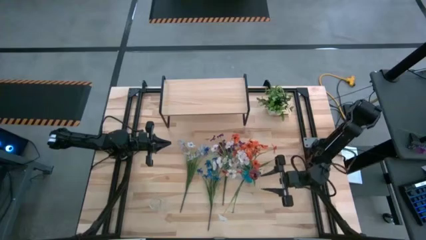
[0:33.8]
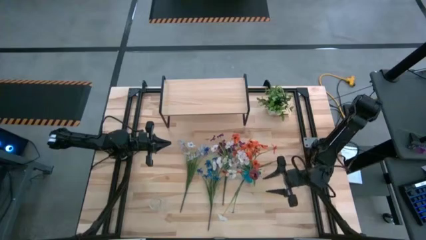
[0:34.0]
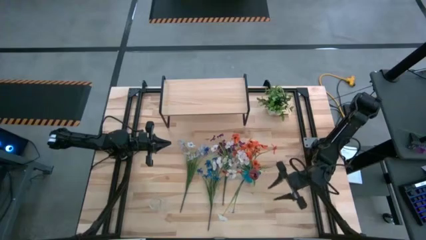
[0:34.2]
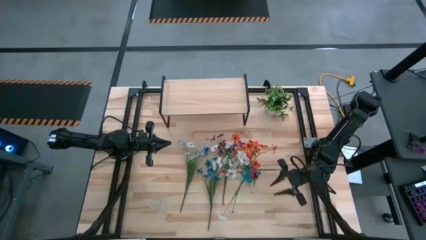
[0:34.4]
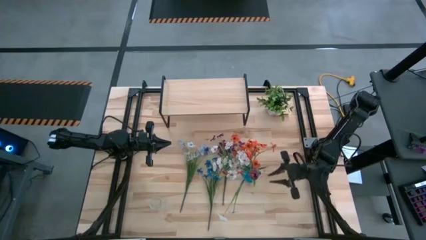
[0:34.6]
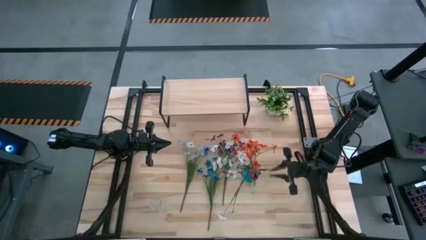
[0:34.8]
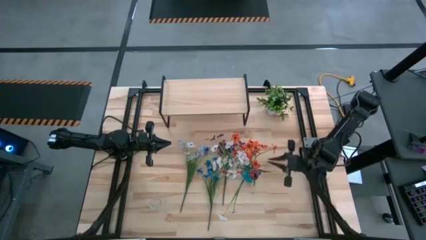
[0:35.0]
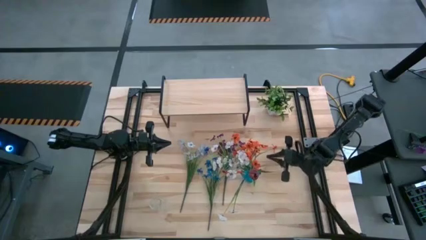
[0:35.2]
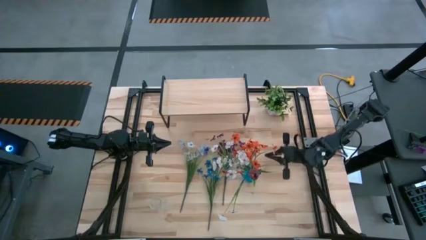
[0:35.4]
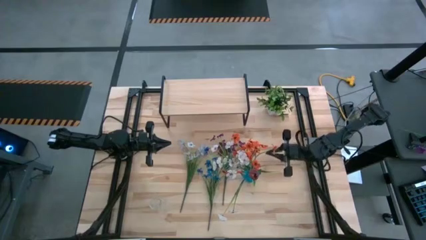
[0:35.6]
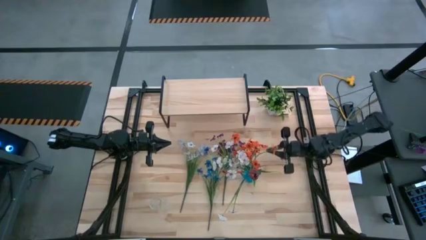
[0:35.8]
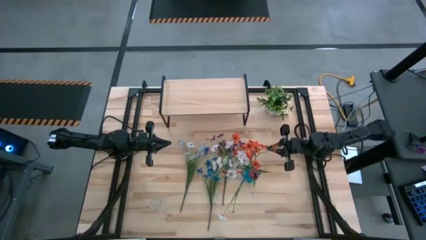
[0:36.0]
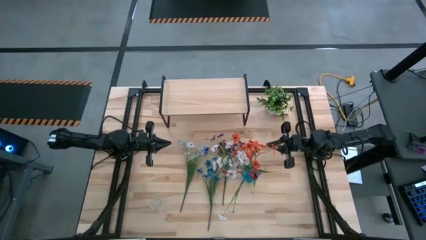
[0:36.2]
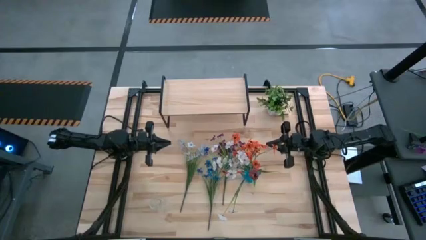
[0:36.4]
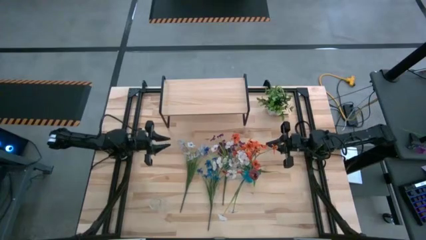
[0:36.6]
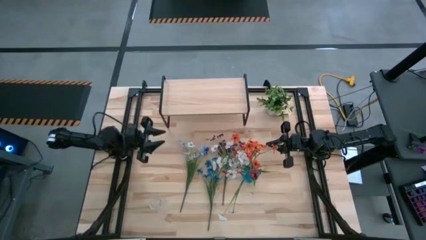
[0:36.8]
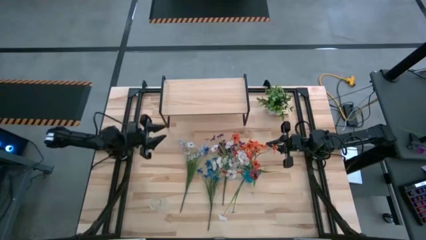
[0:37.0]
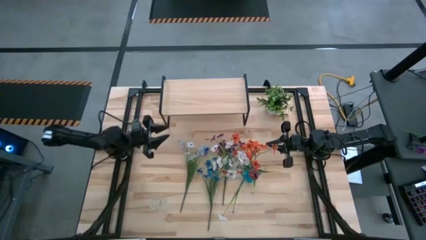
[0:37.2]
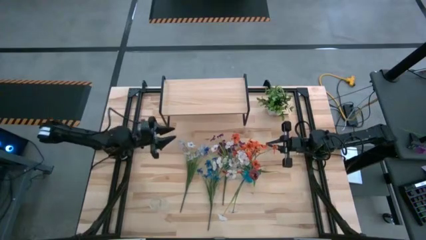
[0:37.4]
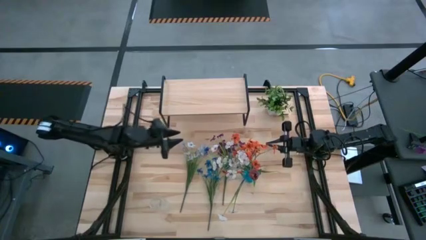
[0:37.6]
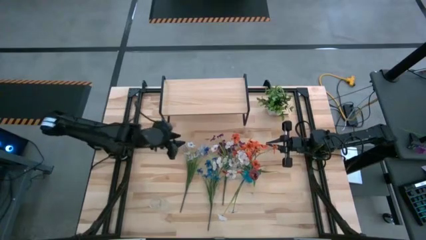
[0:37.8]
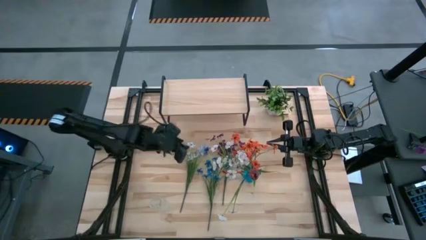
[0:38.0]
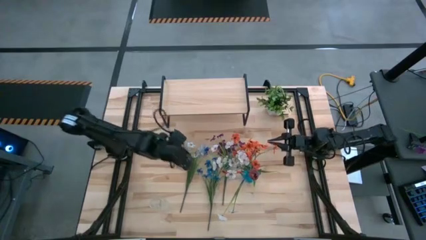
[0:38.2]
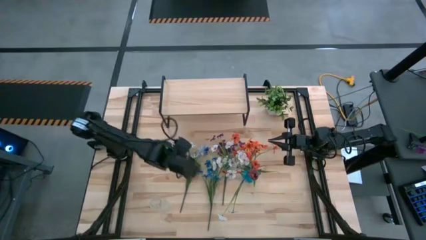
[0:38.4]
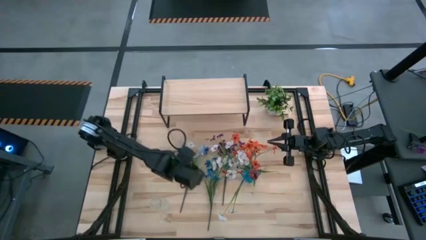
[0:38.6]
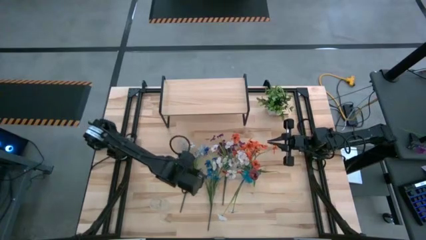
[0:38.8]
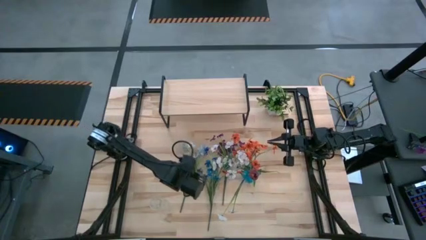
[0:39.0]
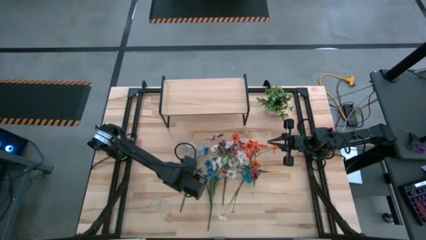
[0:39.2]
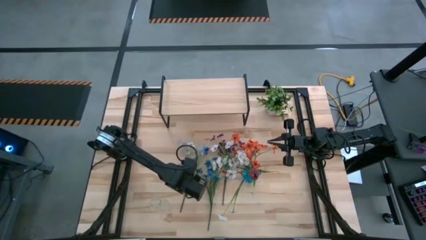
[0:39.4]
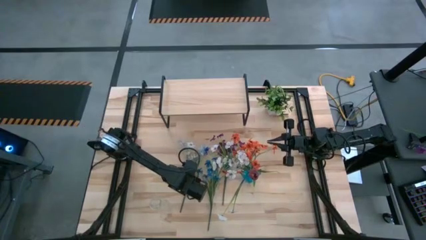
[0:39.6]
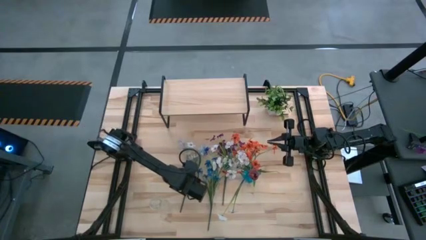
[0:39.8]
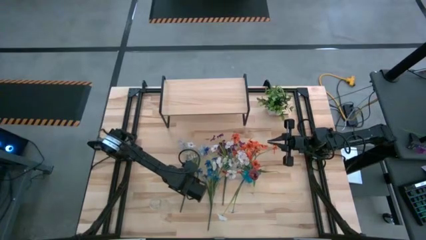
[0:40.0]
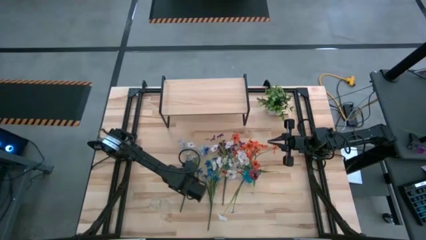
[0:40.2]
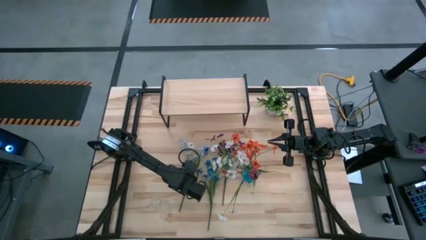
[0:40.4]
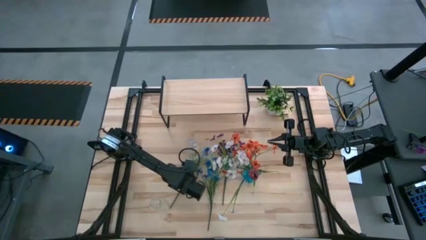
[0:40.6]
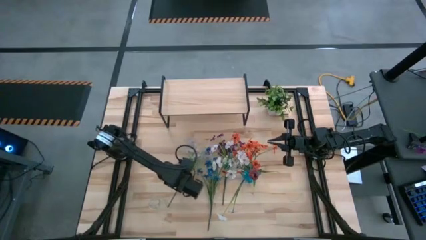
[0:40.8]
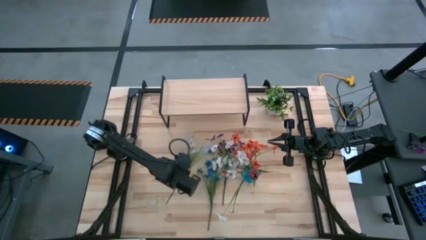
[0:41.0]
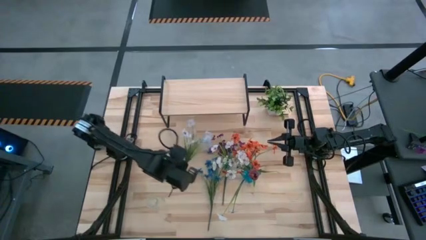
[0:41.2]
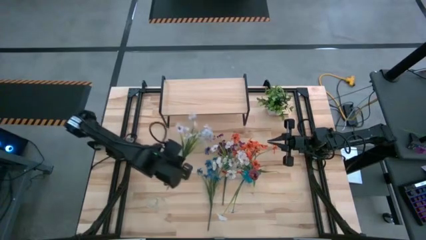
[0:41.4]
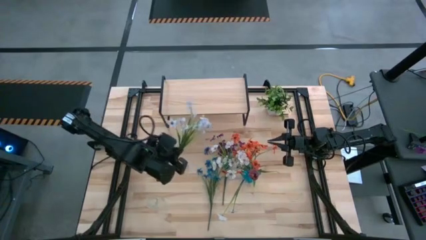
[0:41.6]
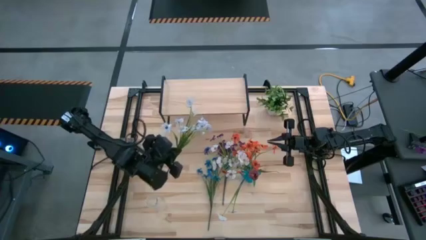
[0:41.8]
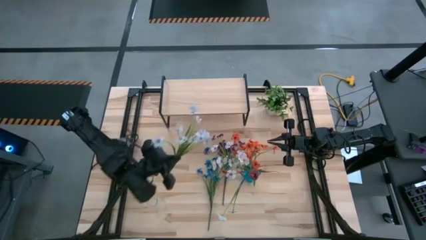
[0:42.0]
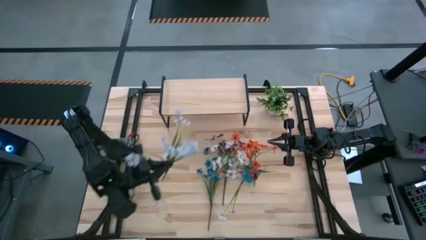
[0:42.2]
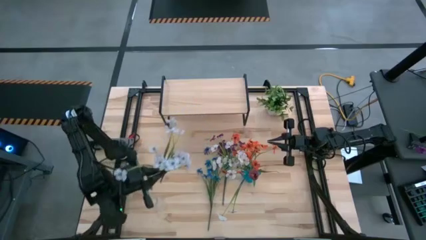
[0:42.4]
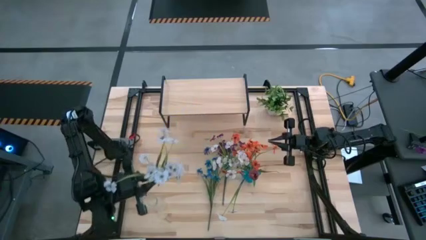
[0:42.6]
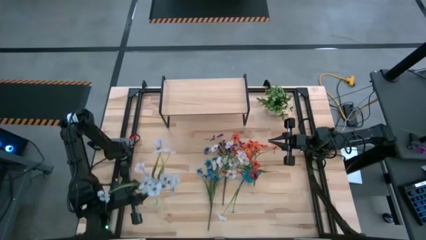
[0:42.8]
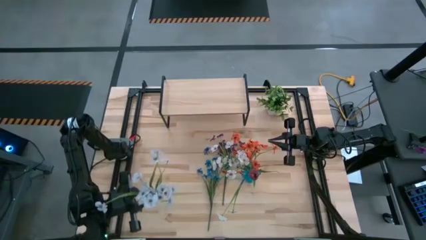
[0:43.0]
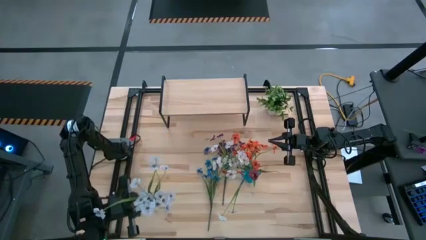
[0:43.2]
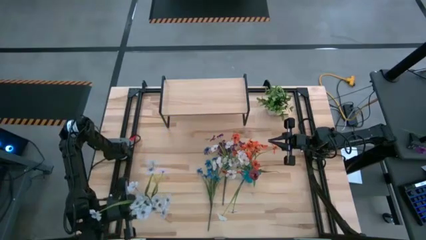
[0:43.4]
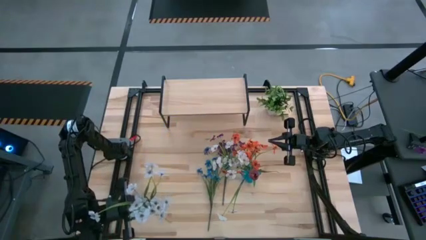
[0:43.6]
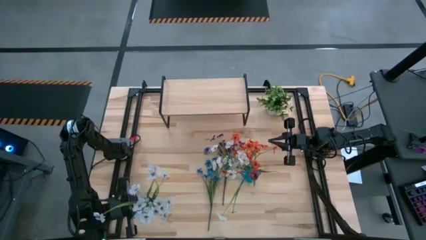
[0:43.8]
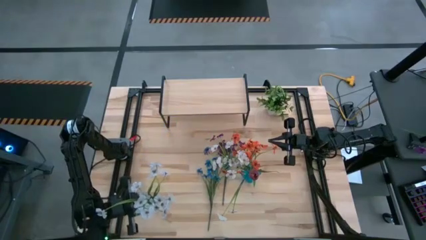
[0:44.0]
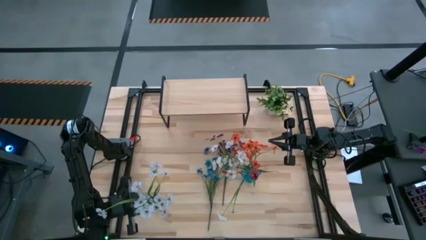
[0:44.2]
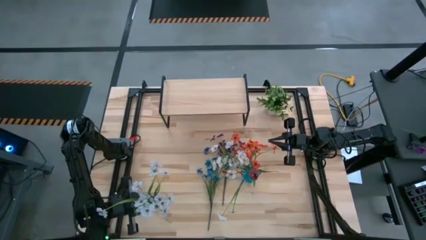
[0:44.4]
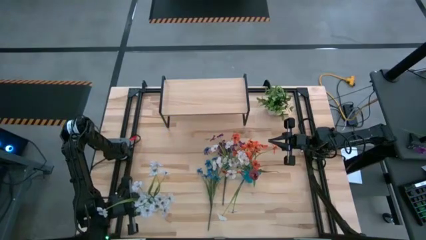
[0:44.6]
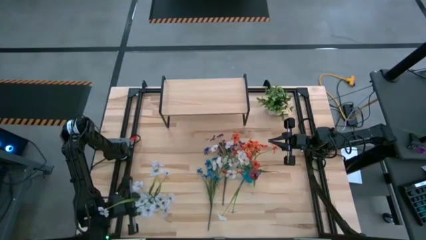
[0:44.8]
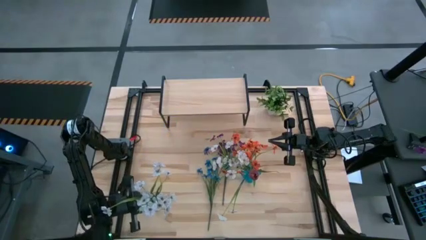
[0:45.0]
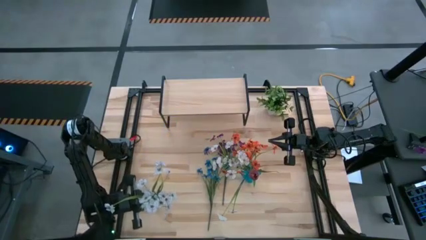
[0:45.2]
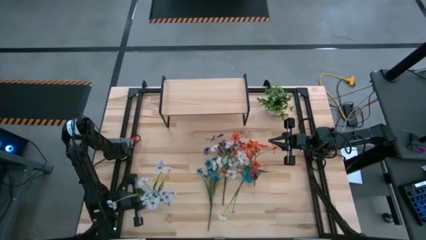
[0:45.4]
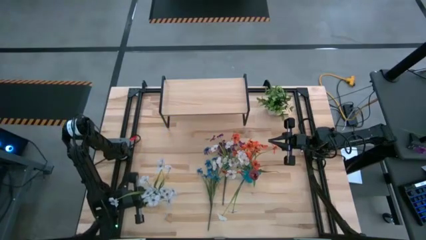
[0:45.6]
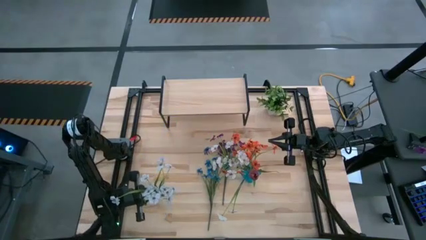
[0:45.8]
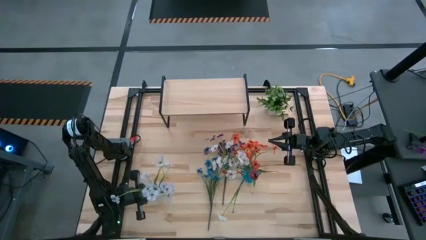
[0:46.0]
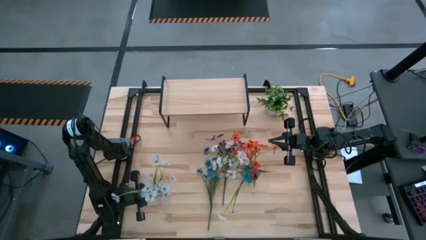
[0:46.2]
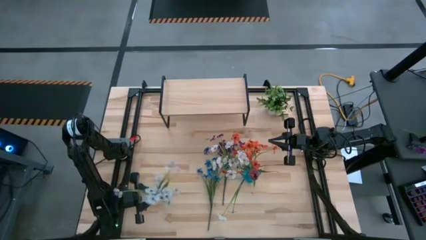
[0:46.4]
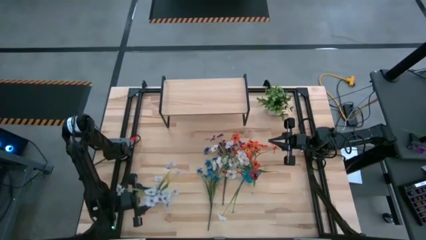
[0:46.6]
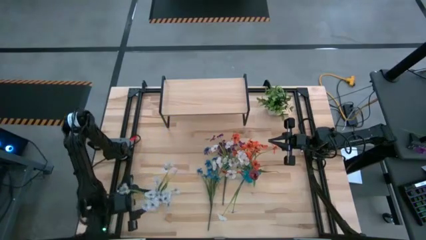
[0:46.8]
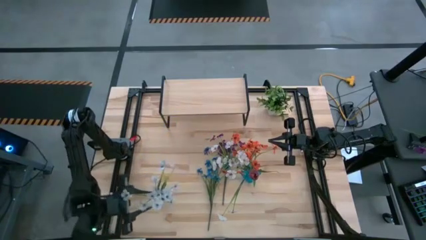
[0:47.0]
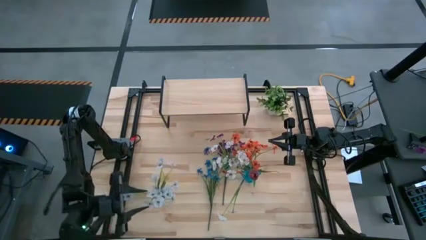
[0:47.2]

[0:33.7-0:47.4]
Task: Pick and place flowers into a vace then onto a shelf
Put the white flowers into the transparent vase

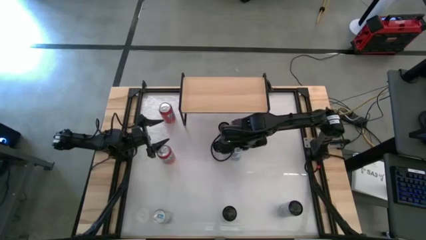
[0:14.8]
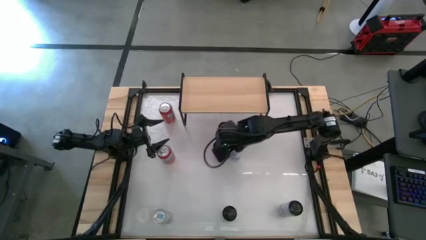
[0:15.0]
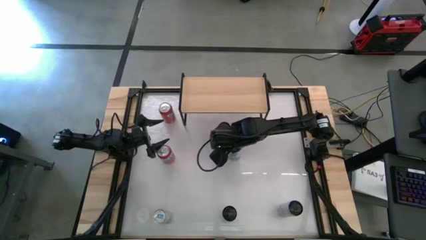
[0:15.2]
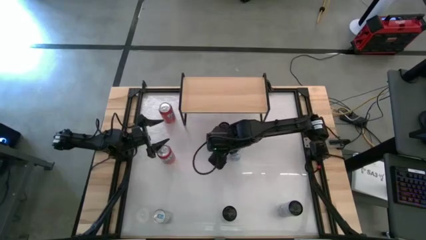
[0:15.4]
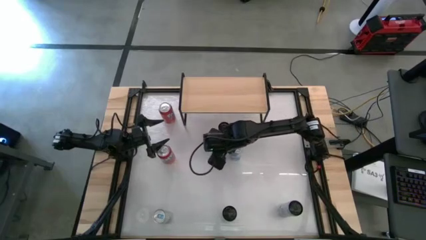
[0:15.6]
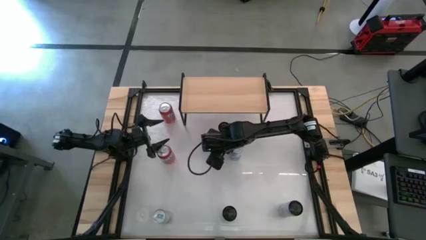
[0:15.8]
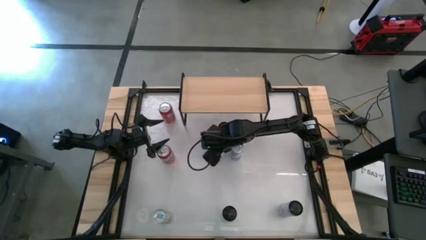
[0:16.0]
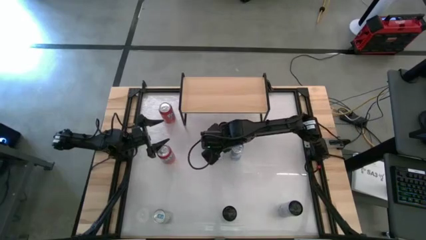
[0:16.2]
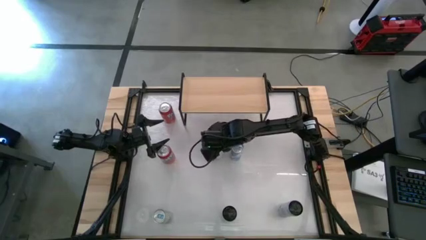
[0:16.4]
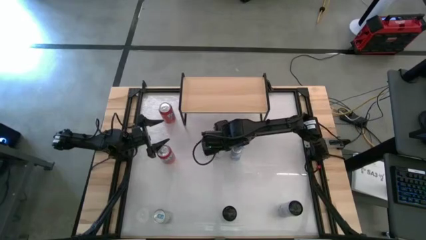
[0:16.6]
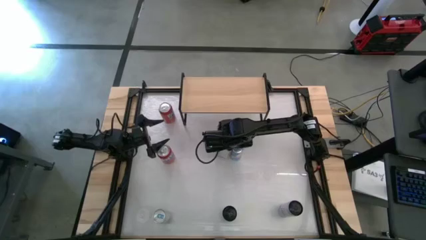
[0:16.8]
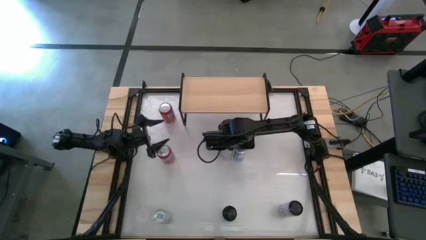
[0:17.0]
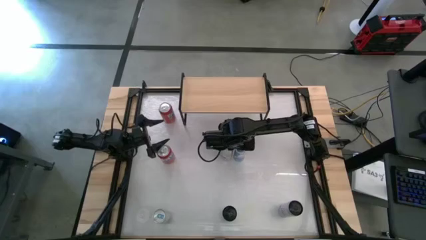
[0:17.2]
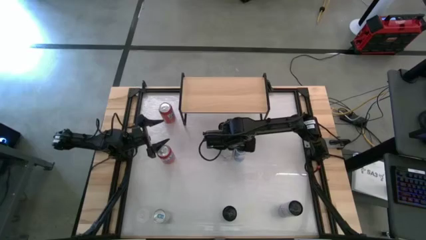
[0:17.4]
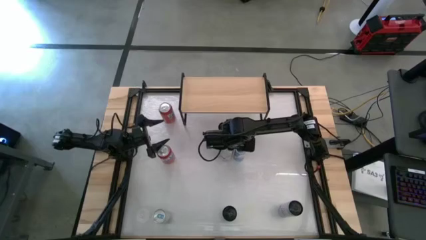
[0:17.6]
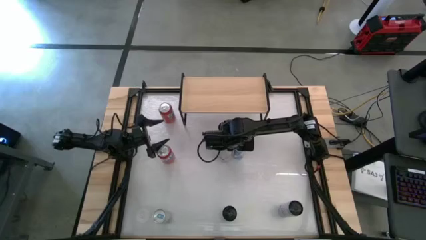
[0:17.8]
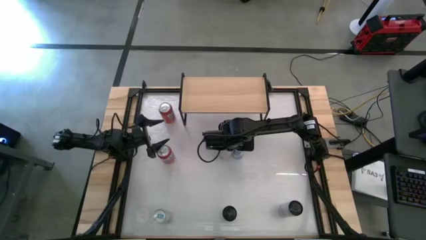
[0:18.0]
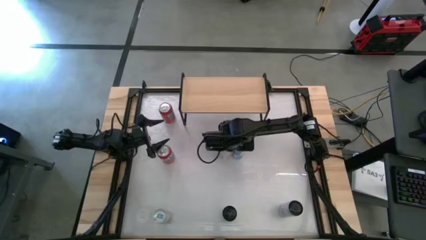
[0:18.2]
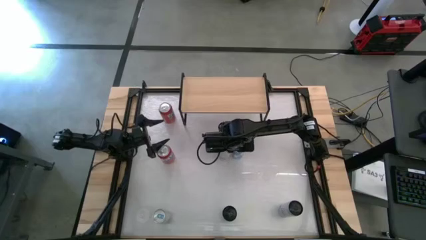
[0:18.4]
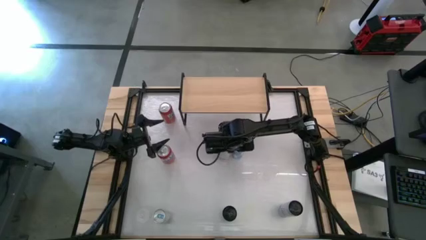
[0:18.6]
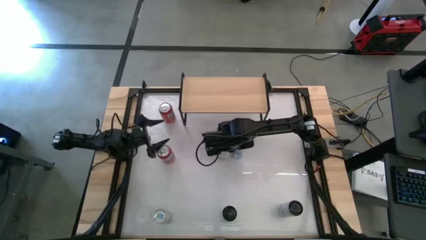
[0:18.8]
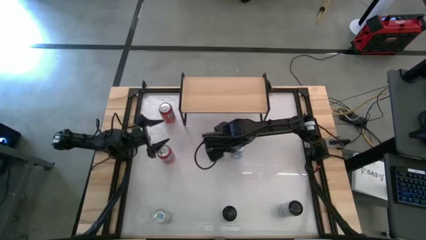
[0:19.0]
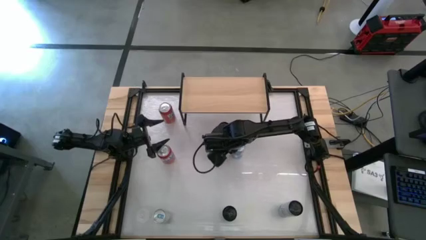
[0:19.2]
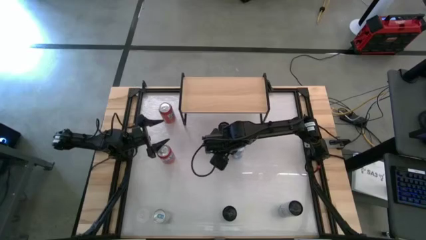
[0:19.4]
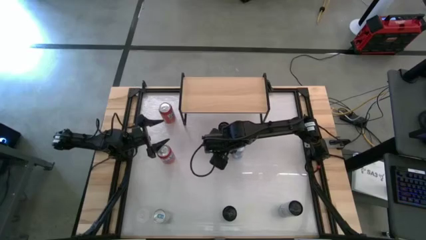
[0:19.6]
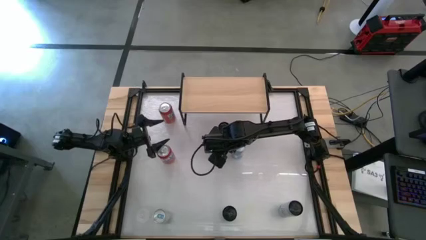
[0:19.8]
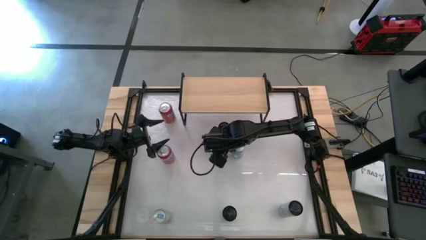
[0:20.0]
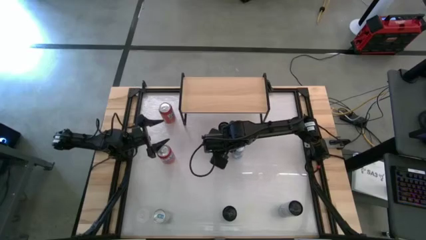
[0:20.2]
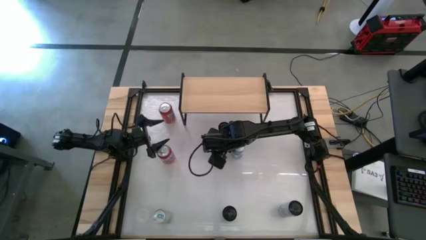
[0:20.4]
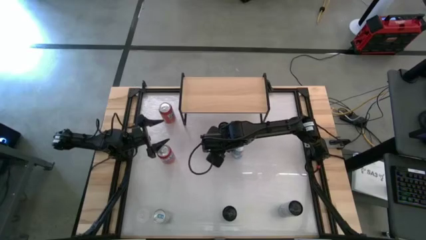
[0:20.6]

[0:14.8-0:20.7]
Task: Place canned beverage on shelf
Adjust the white pink soda can
